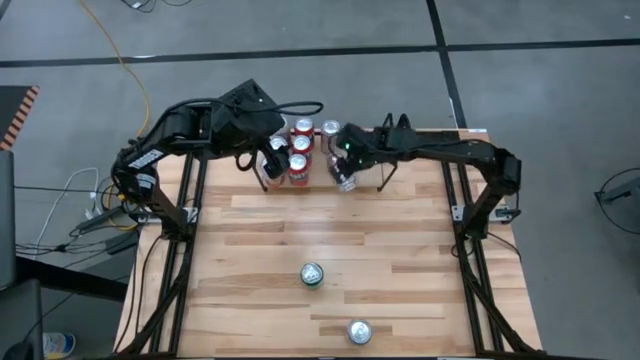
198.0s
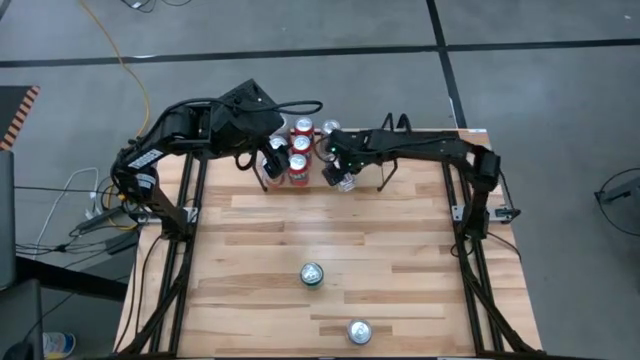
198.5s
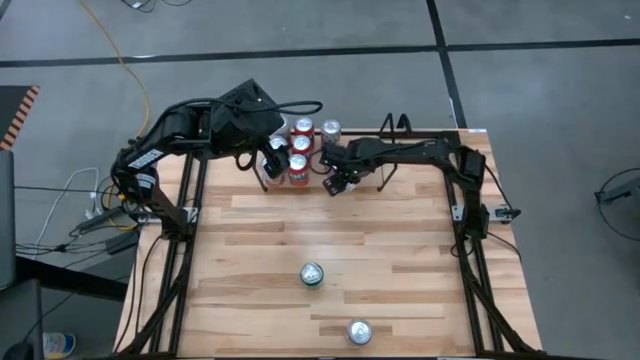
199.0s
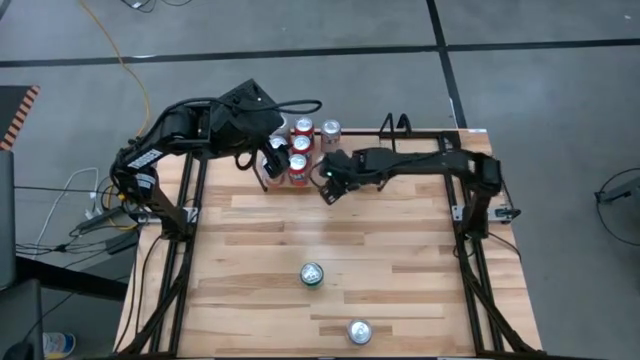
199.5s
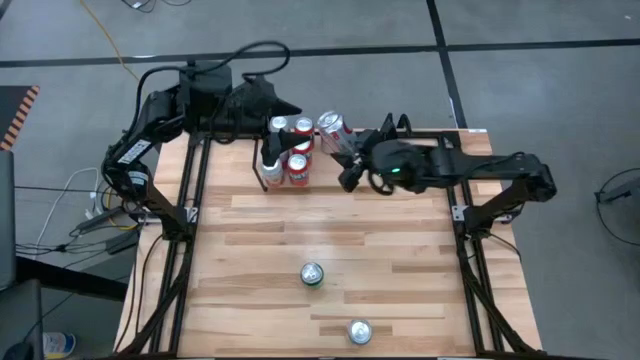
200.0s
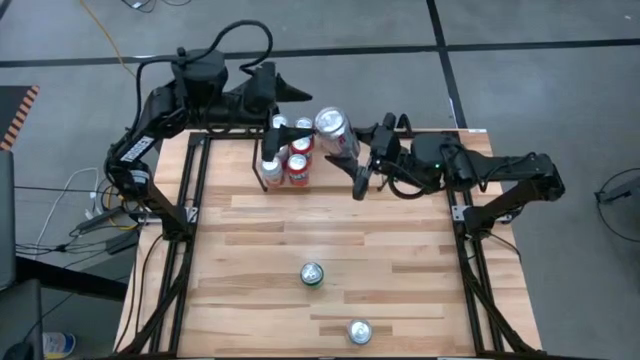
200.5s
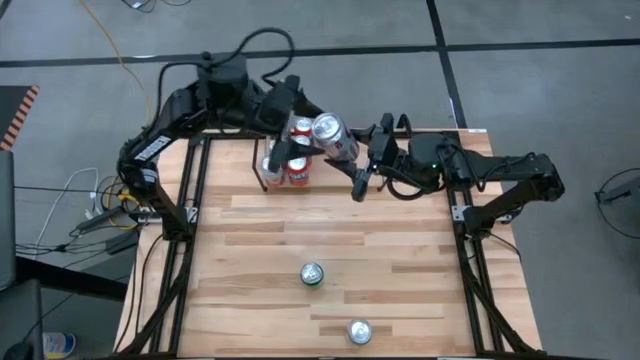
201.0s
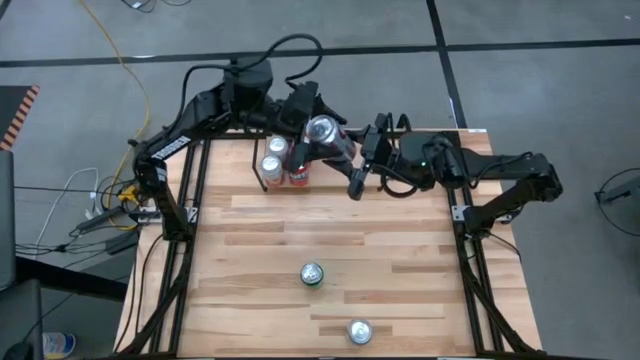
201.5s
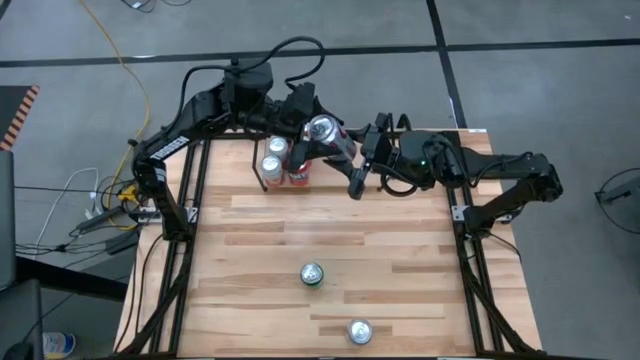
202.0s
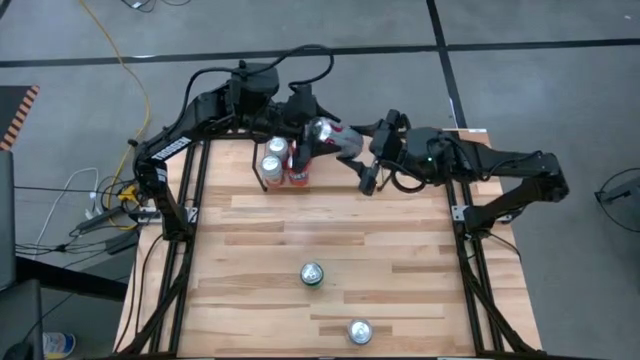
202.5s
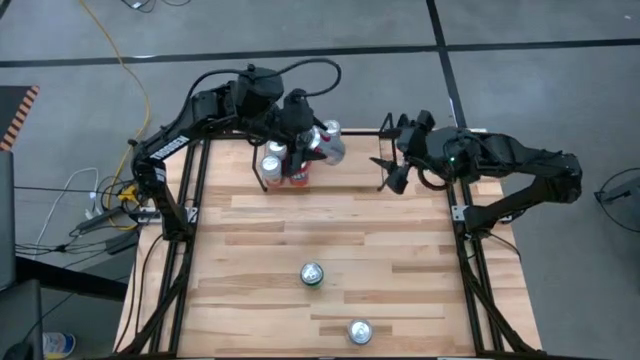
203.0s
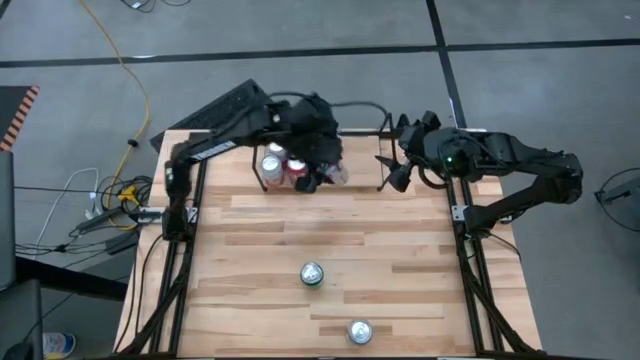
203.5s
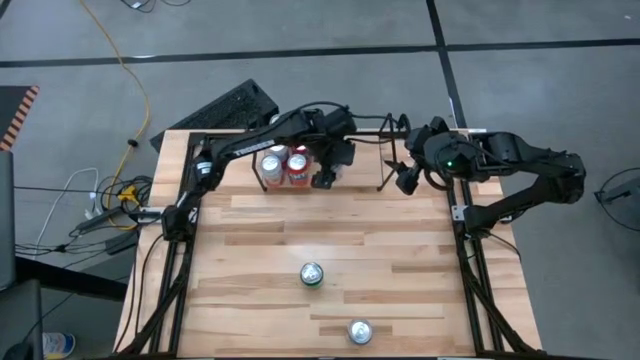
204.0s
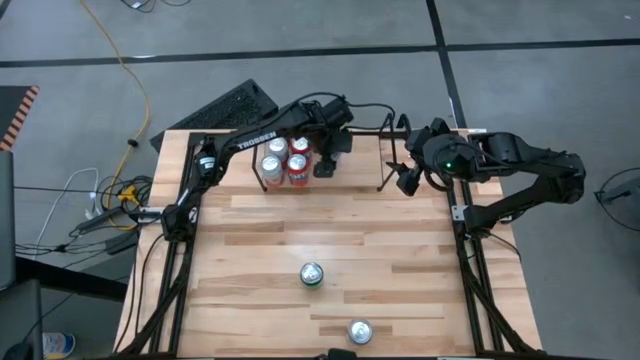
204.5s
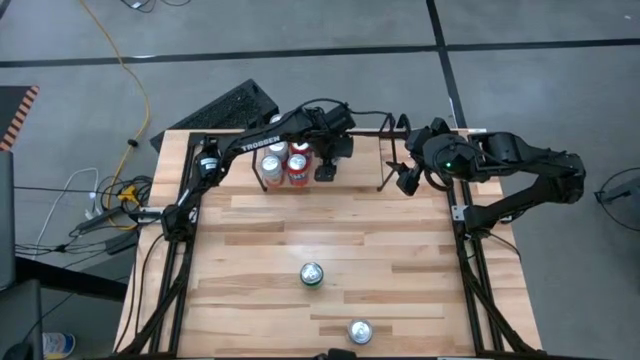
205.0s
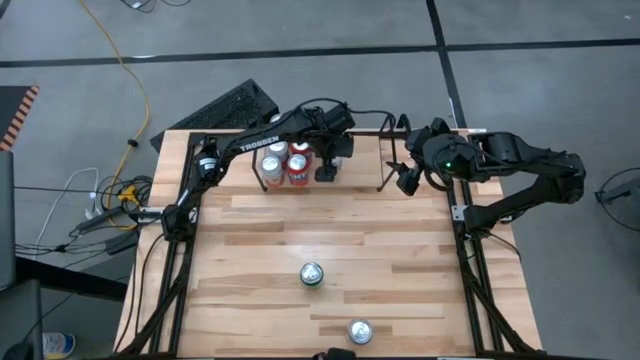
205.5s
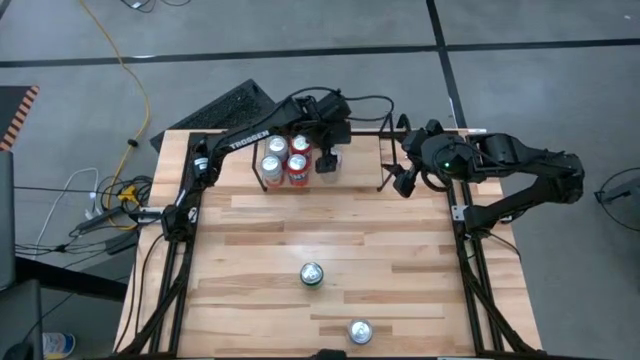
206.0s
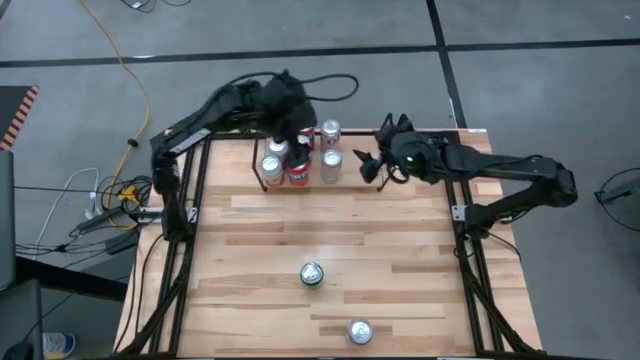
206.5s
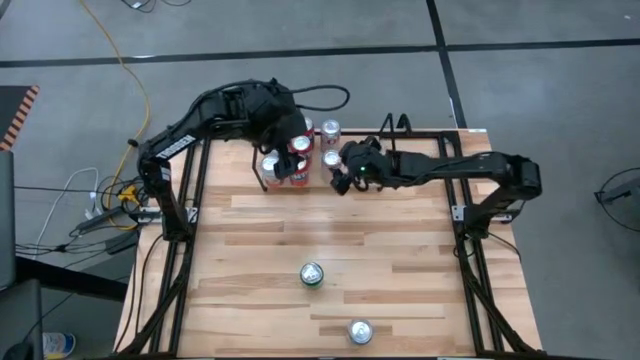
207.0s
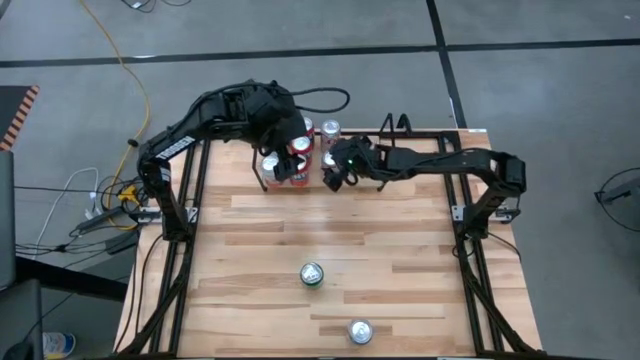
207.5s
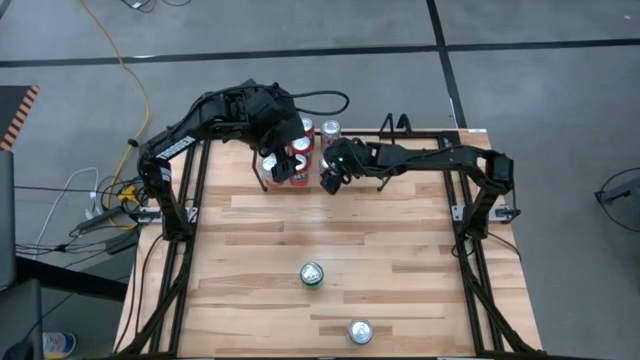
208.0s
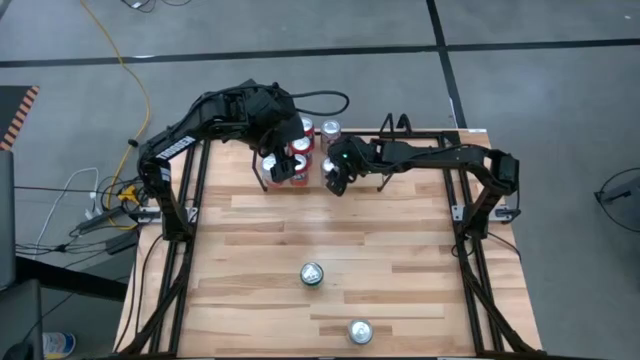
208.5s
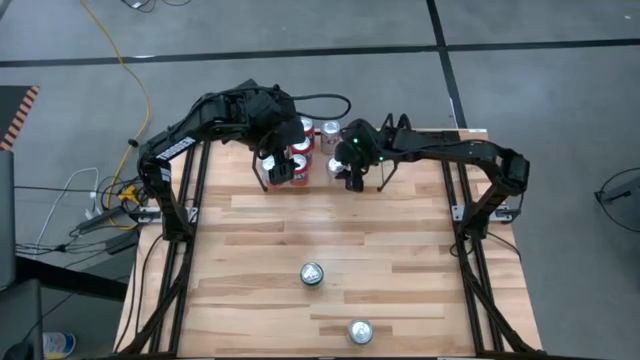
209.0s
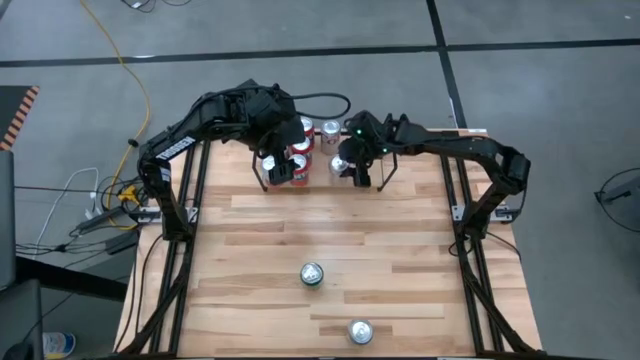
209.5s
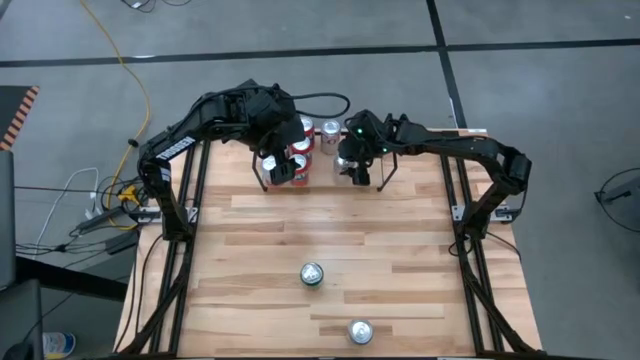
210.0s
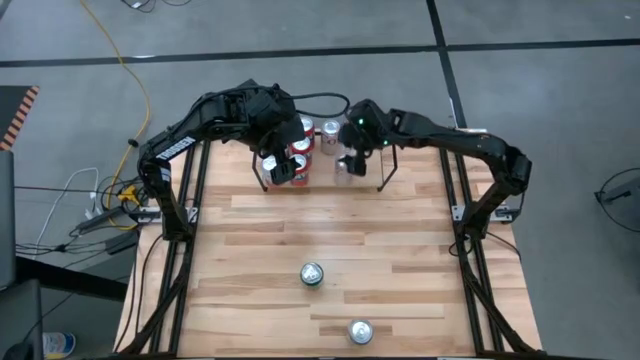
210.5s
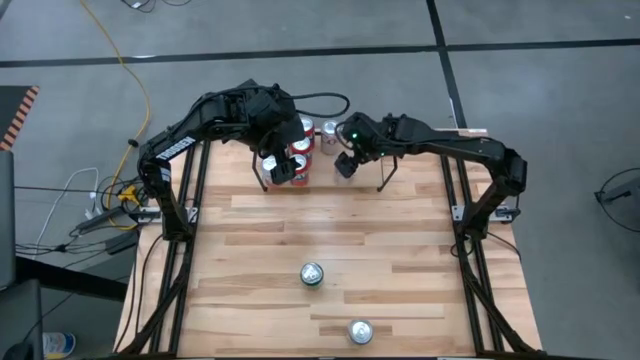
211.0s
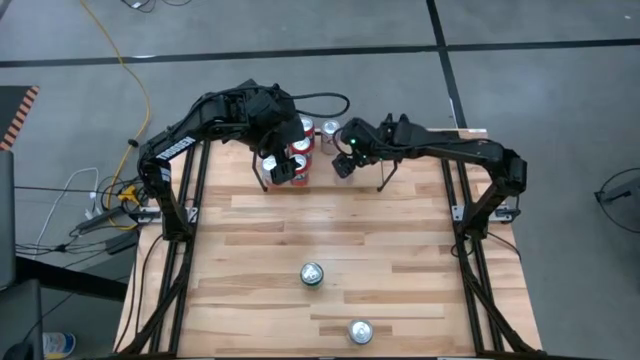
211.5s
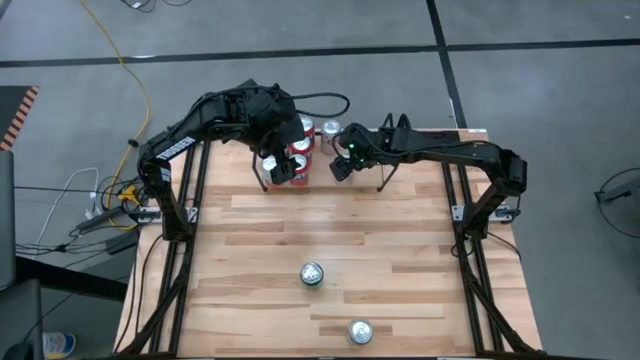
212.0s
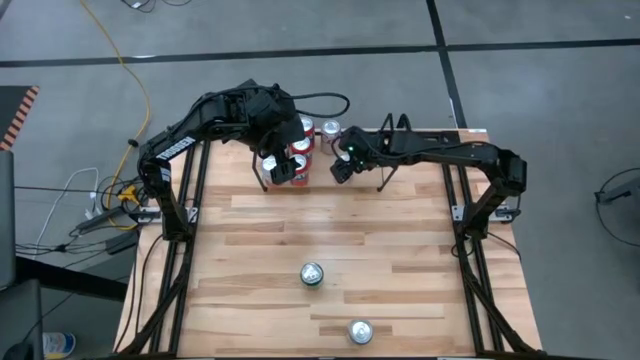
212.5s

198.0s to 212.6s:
Task: Place canned beverage on shelf
Put the left silver soda can on the shelf aligned with the other silver soda can
